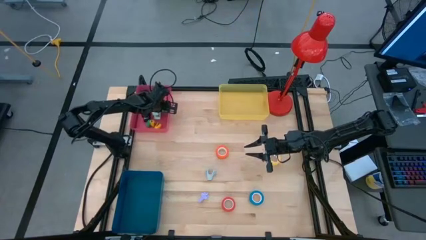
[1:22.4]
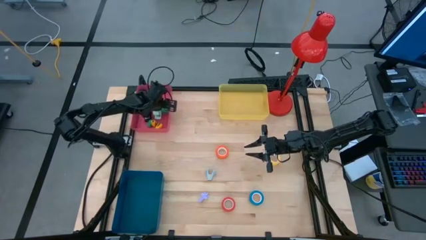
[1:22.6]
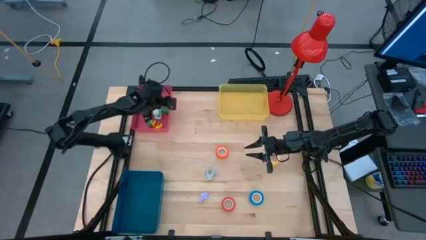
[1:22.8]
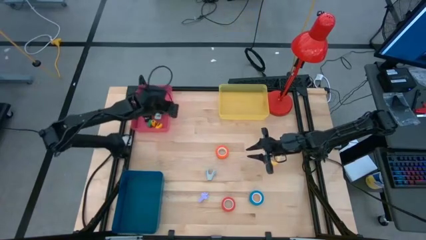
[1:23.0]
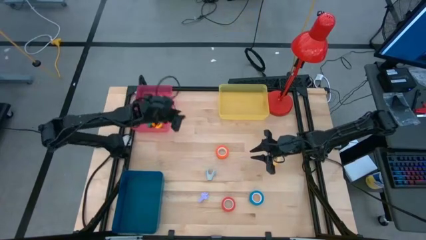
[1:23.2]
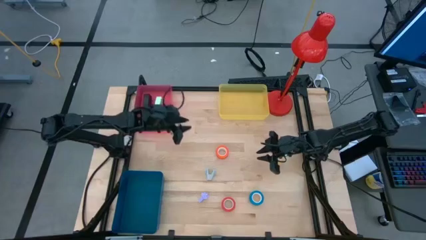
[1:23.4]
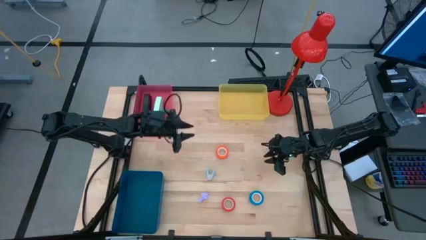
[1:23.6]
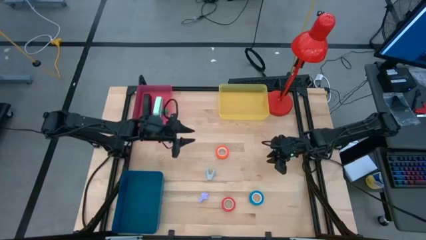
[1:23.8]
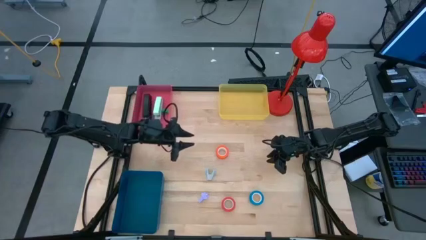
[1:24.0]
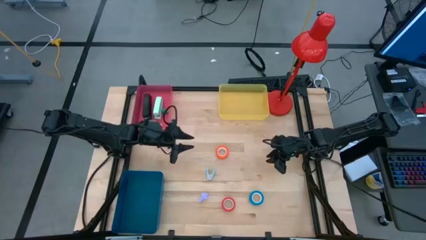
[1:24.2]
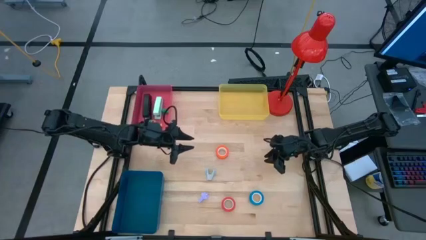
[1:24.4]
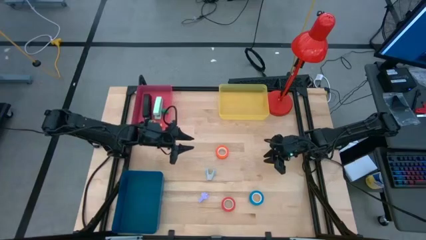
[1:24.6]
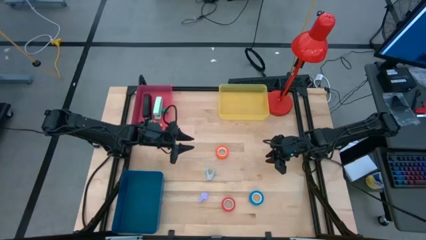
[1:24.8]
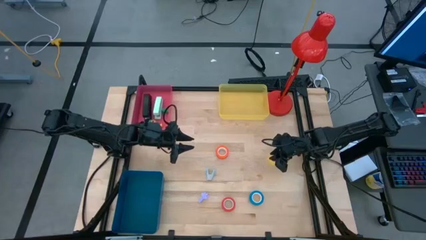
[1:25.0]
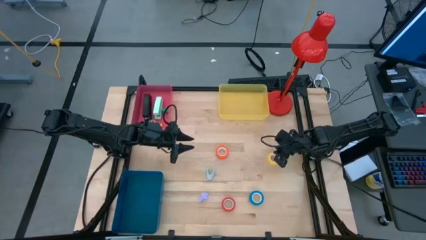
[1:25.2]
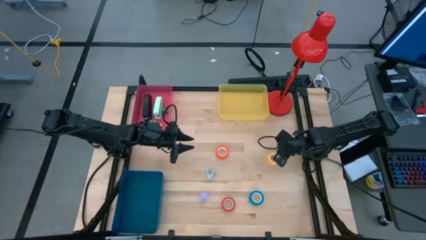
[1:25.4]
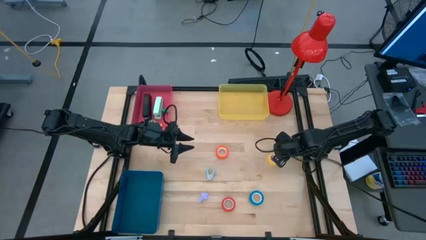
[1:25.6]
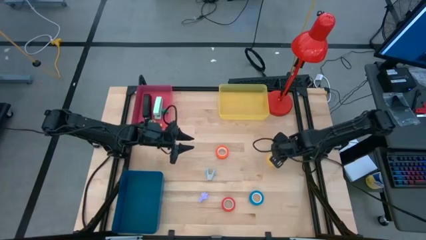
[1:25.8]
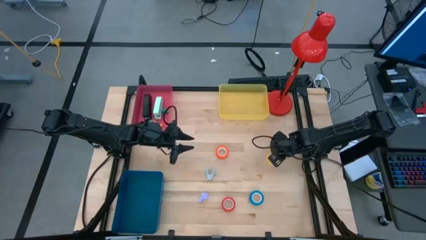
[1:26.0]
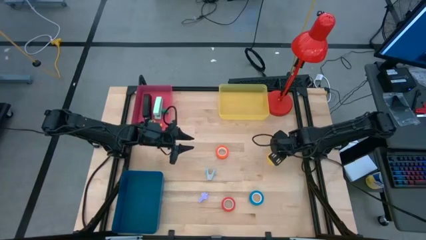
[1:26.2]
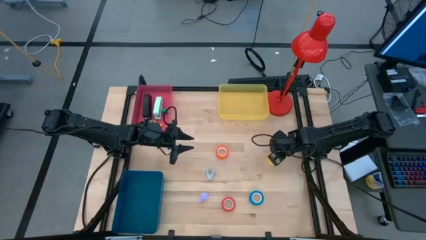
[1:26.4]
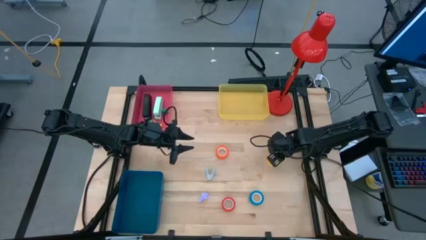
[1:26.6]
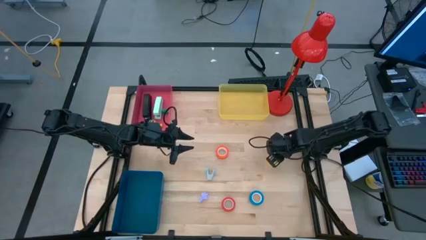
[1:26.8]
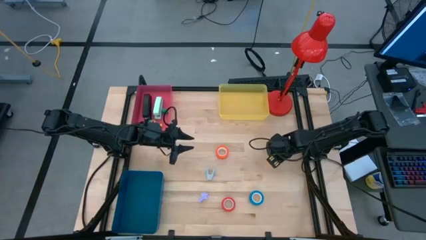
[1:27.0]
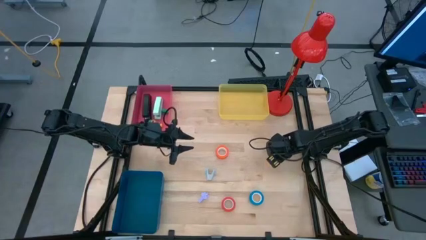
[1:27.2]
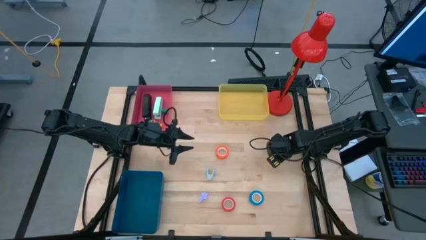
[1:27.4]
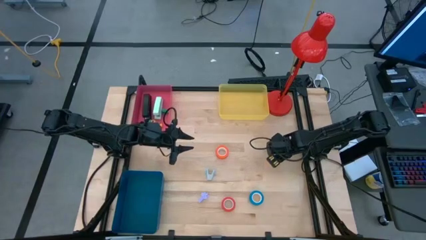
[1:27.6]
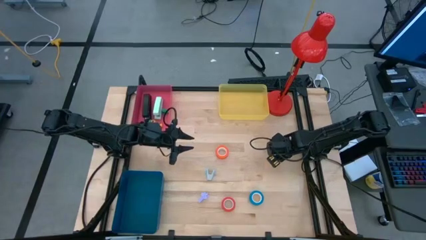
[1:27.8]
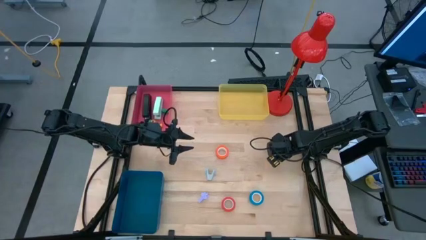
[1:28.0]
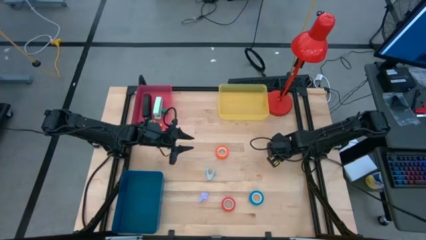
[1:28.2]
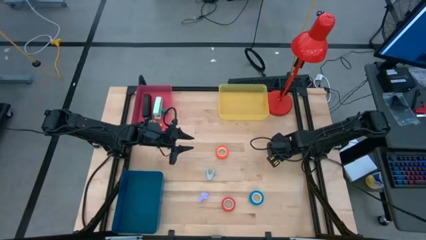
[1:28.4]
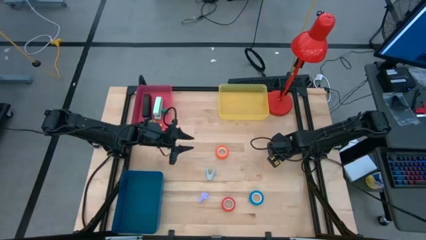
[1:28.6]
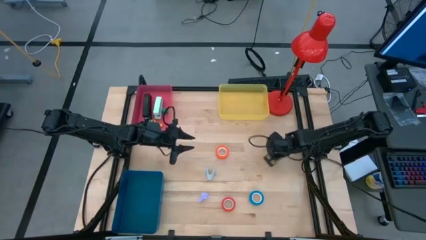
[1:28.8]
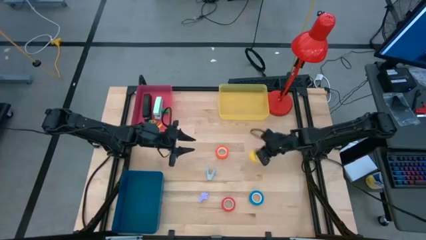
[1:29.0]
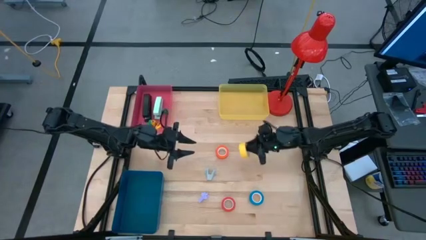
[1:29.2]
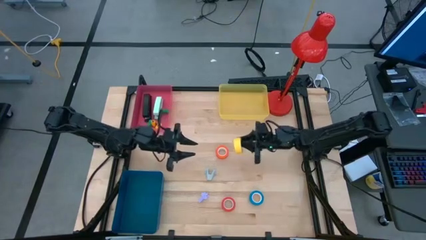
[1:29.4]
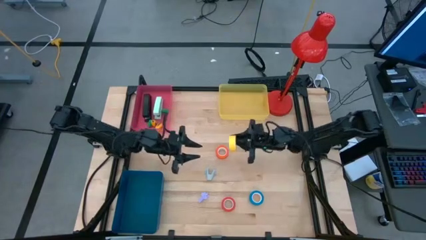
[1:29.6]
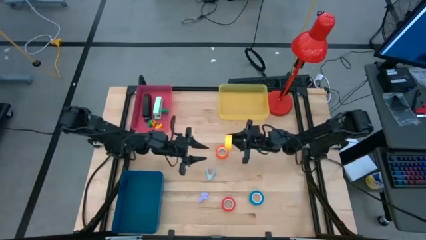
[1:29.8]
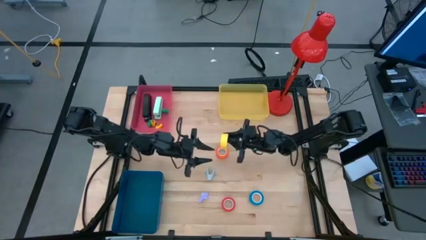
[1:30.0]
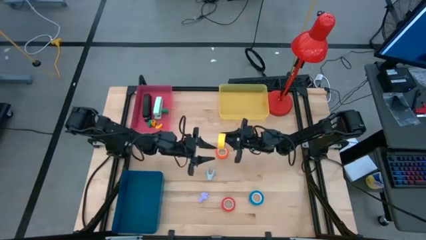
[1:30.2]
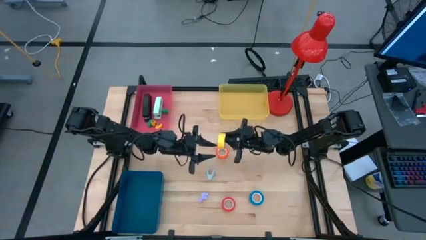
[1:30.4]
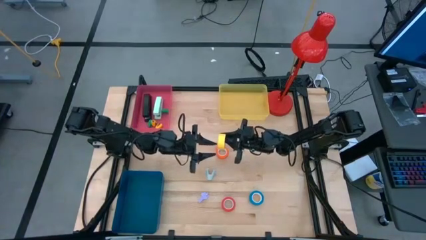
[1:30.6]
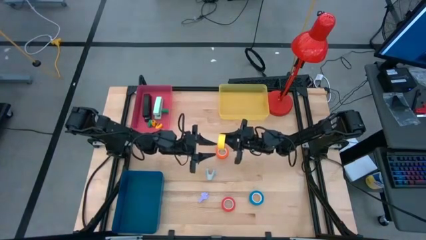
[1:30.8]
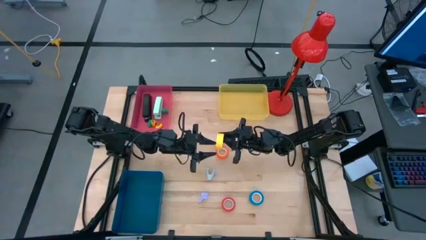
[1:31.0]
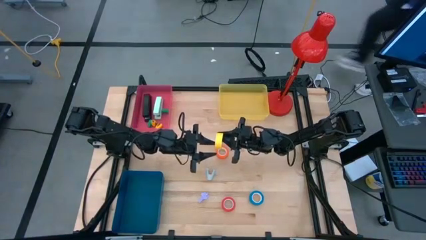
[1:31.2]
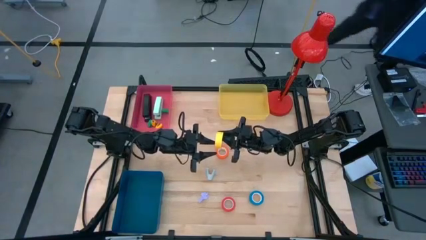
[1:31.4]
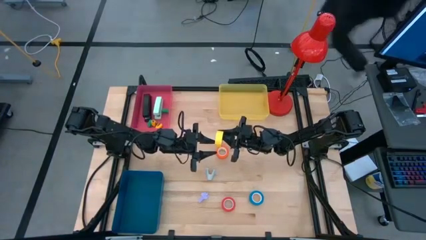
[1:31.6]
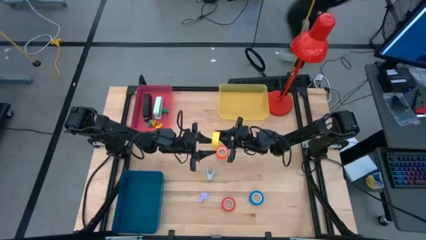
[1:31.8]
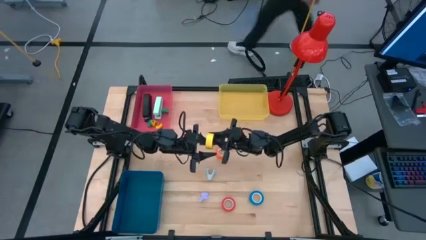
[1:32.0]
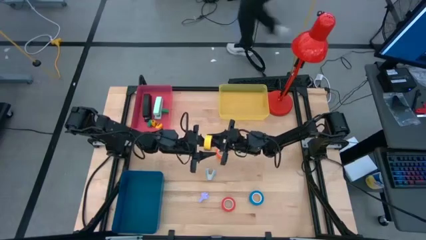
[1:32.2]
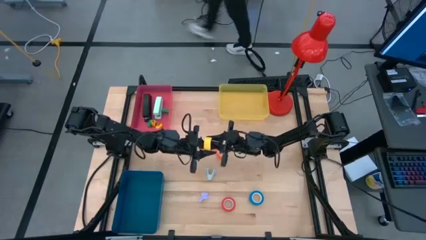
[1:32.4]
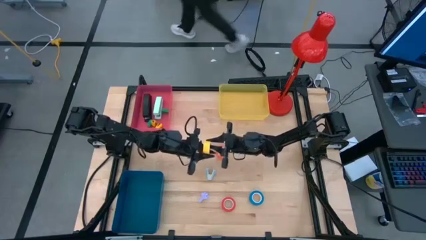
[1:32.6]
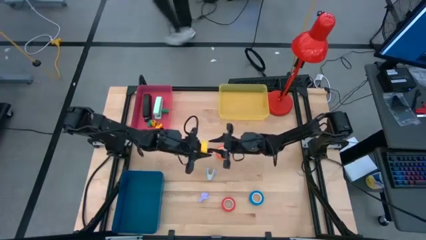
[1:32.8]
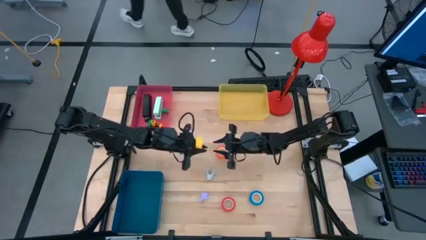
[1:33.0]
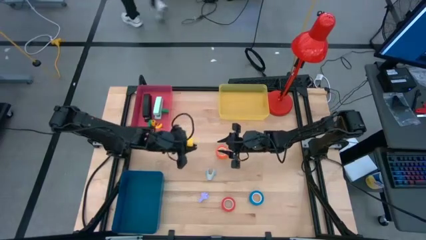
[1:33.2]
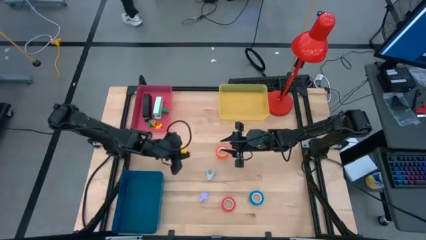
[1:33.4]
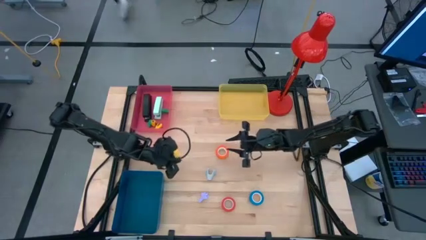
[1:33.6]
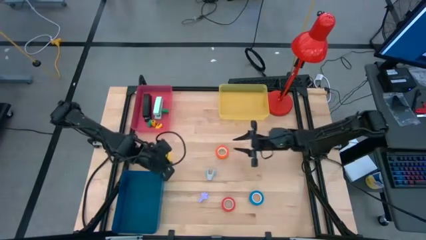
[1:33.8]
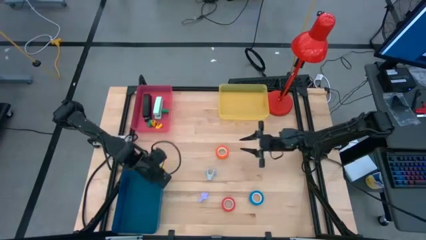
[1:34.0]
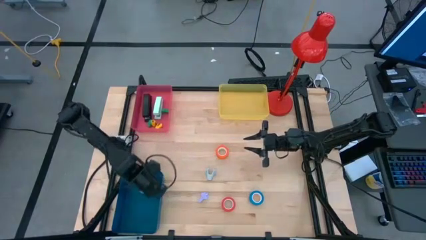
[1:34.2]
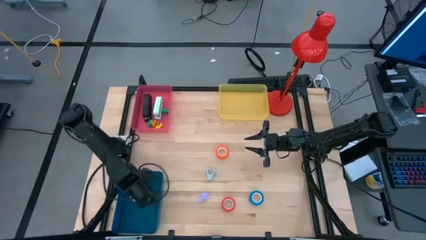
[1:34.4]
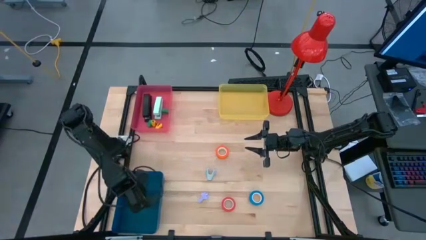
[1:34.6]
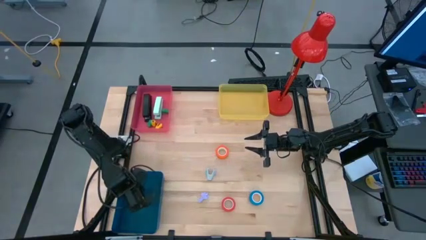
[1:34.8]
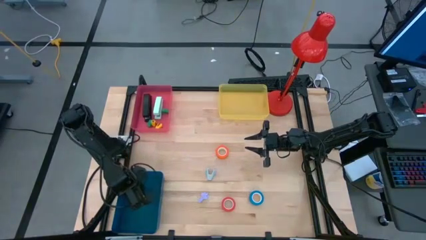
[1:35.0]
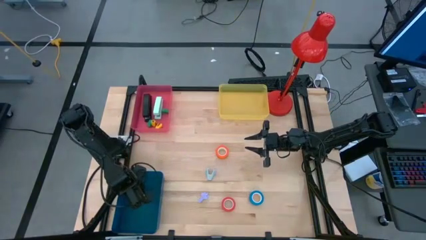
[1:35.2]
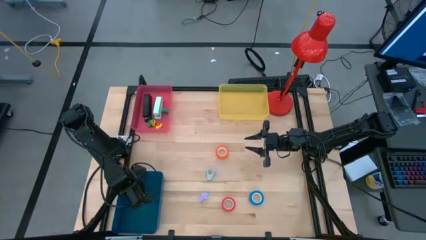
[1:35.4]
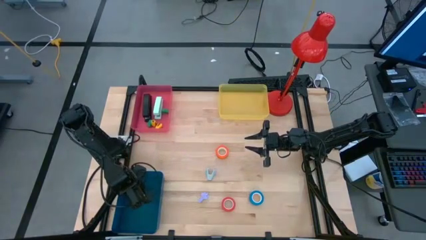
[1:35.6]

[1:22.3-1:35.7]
Task: Pick and place Stapler, Stapler remover, tape
Put the yellow tape into the blue bin
